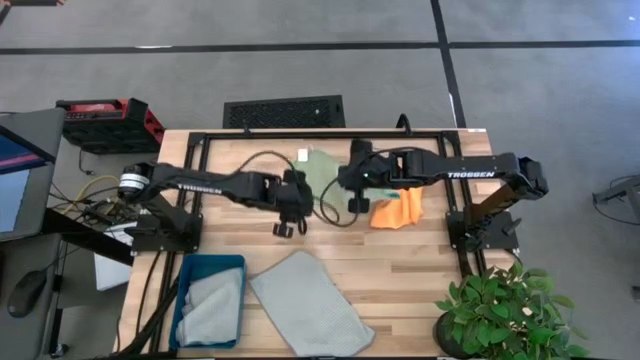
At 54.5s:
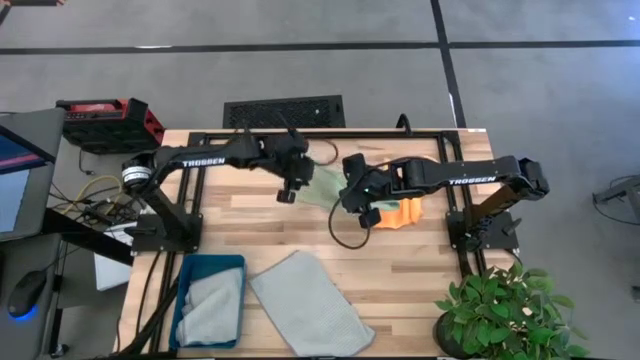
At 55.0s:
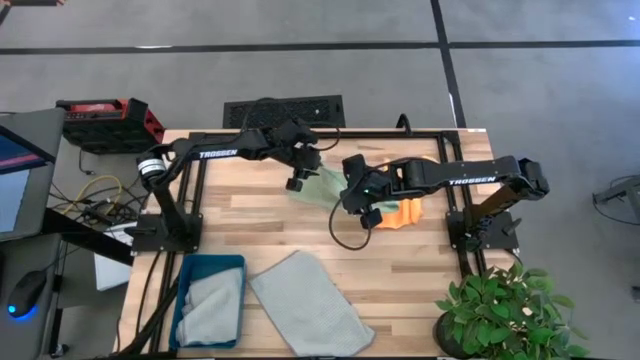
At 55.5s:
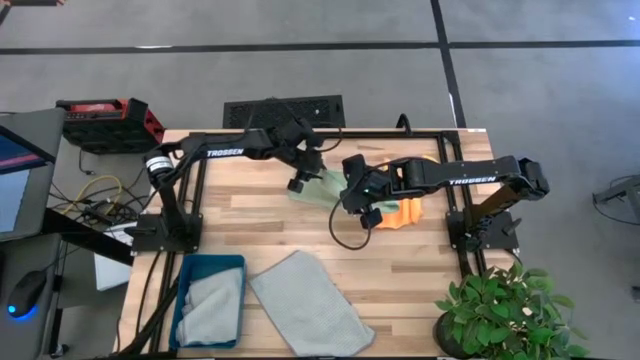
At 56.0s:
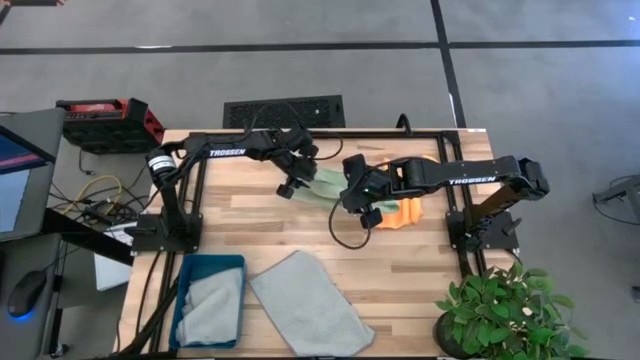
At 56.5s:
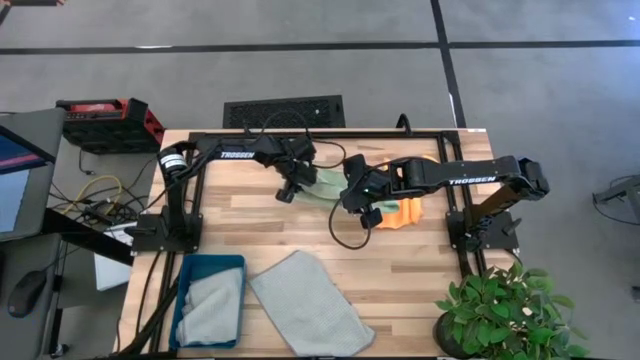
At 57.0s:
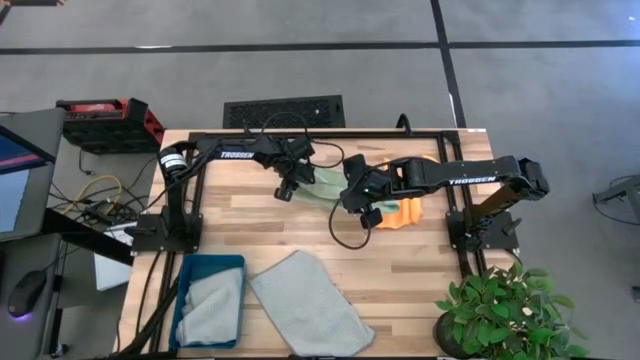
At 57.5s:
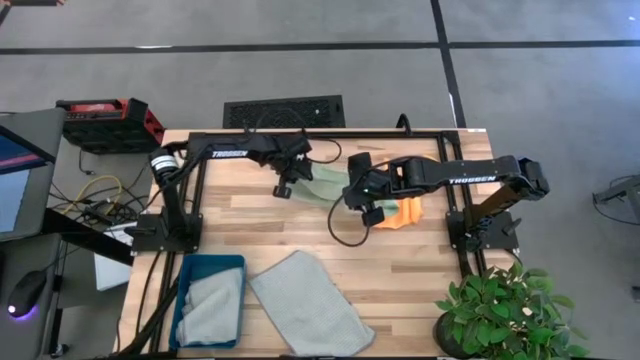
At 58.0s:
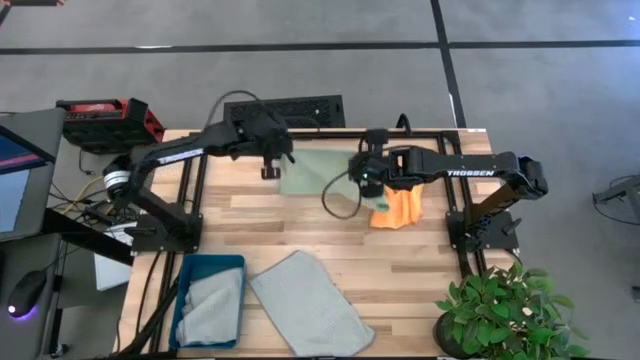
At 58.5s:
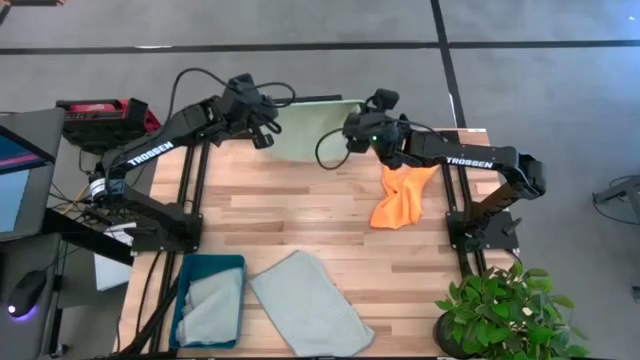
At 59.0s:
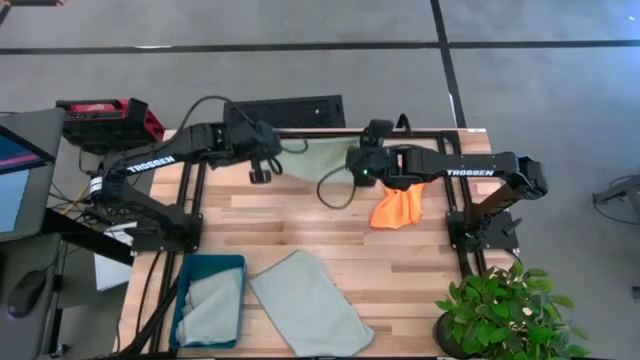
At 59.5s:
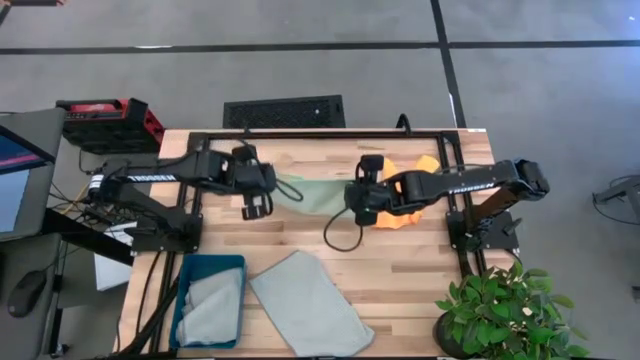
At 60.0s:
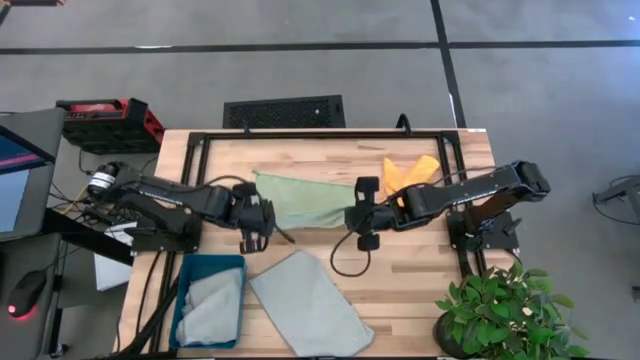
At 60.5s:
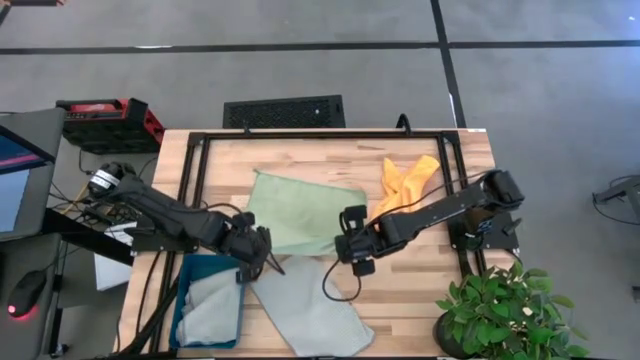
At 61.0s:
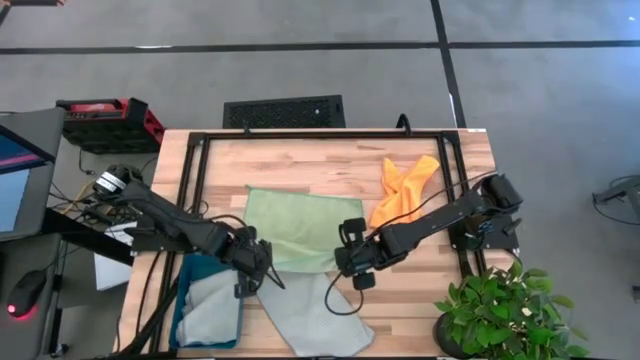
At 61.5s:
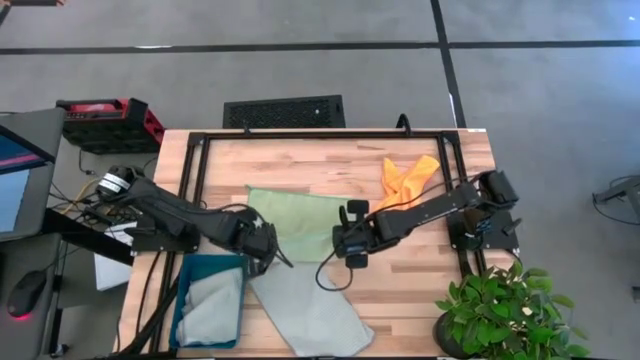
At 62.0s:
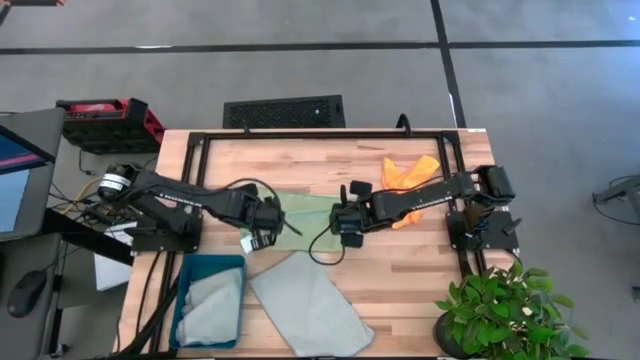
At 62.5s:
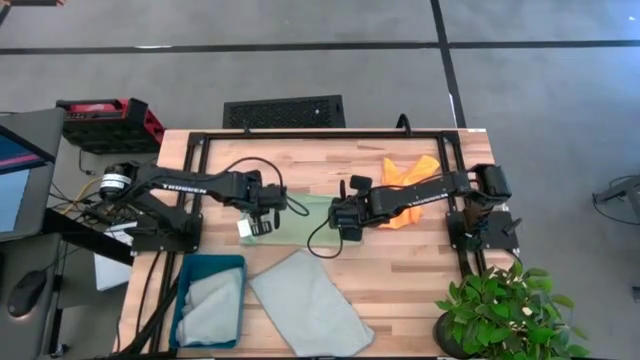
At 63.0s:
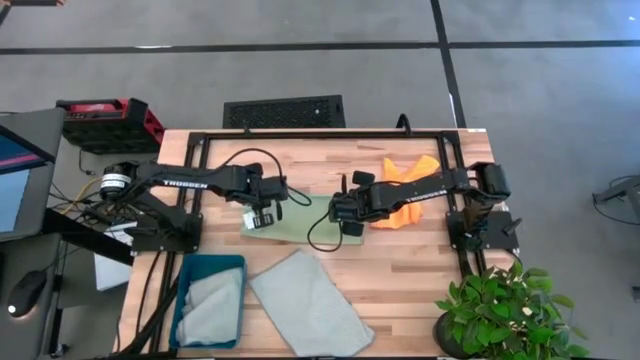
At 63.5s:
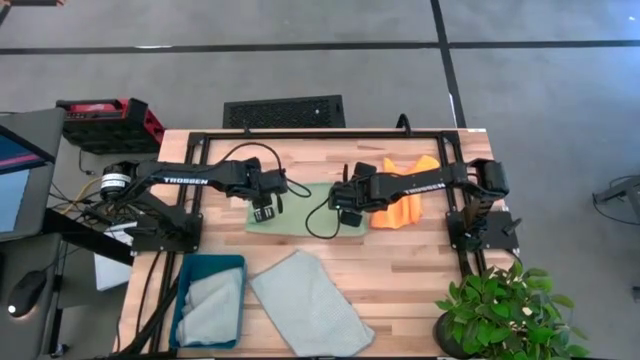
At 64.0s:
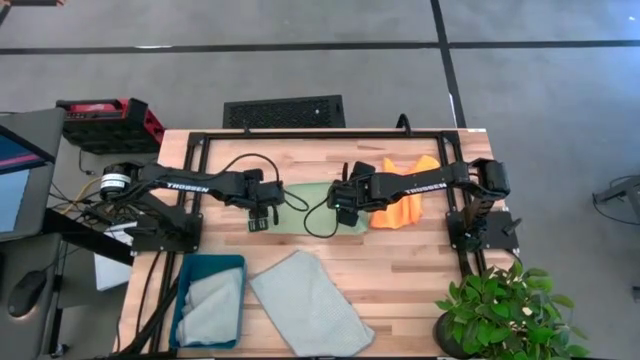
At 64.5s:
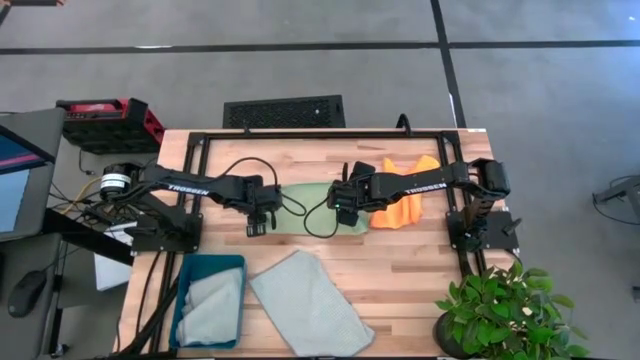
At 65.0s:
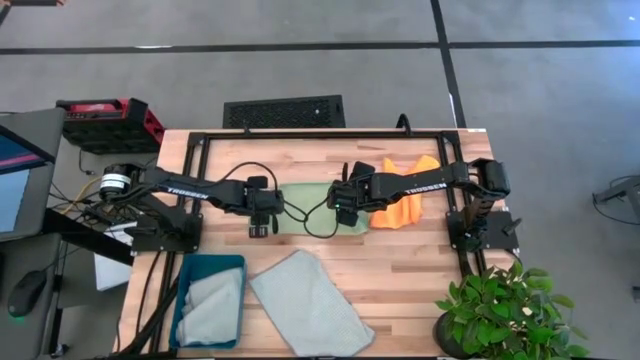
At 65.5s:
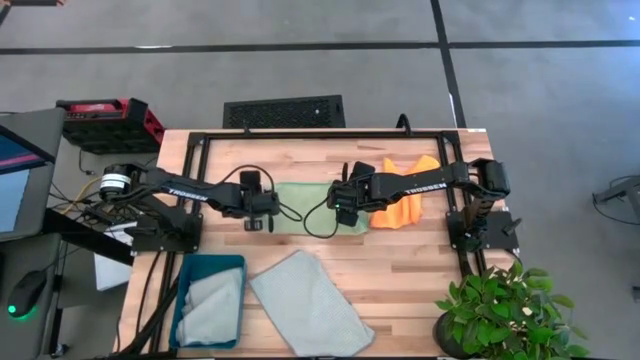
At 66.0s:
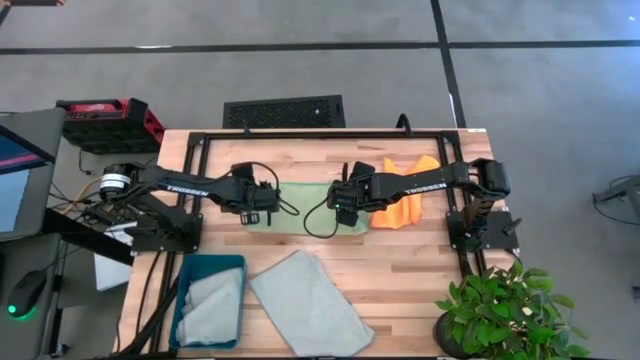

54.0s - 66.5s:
Task: Fold microfiber towels
Fold the green microfiber towel

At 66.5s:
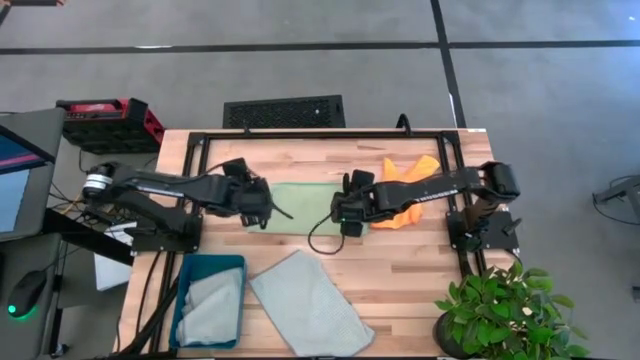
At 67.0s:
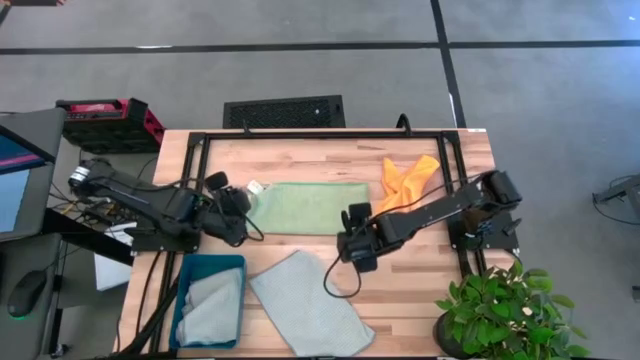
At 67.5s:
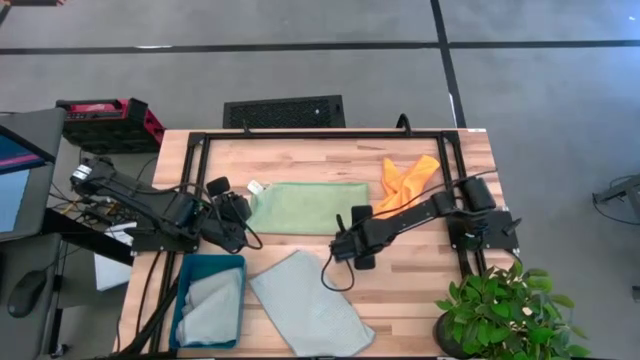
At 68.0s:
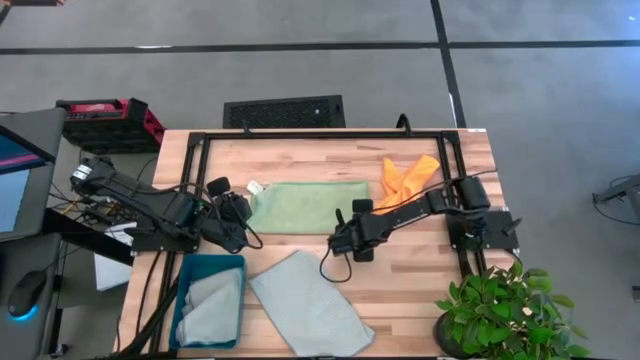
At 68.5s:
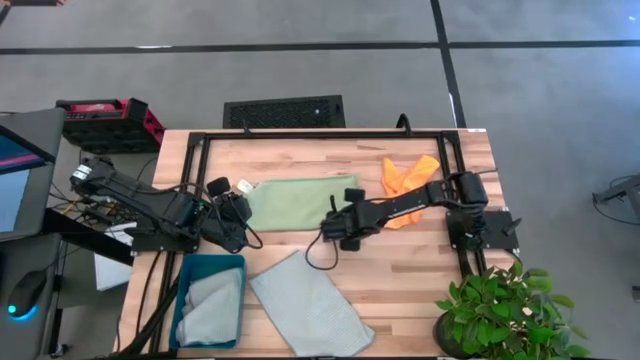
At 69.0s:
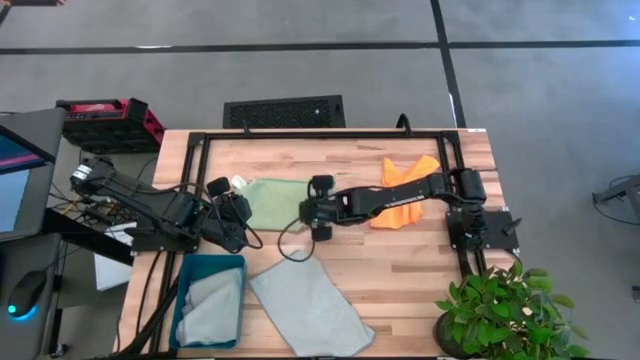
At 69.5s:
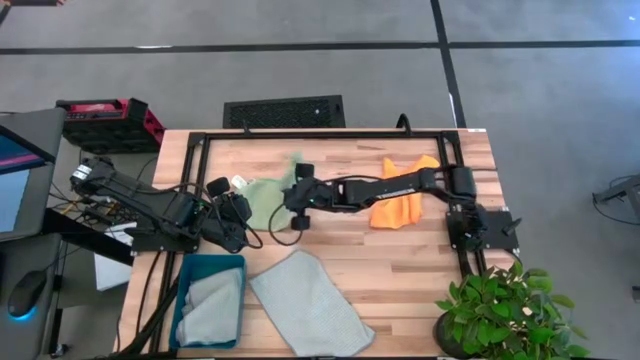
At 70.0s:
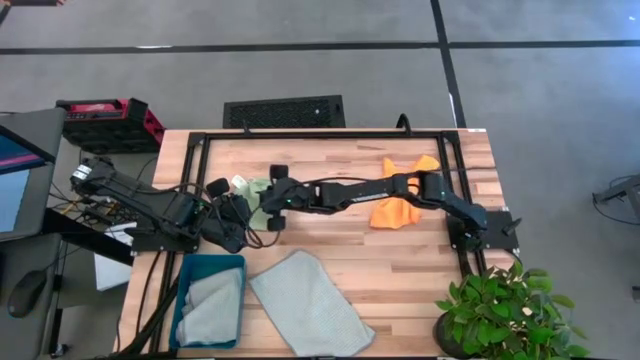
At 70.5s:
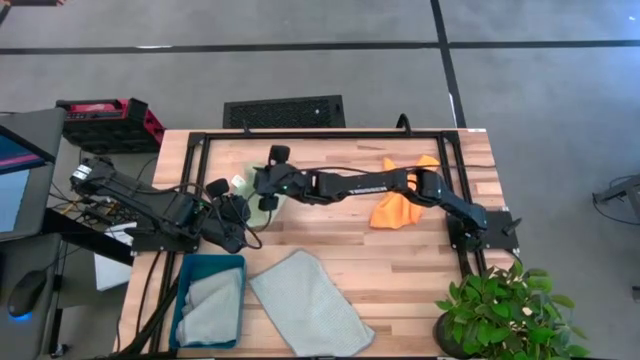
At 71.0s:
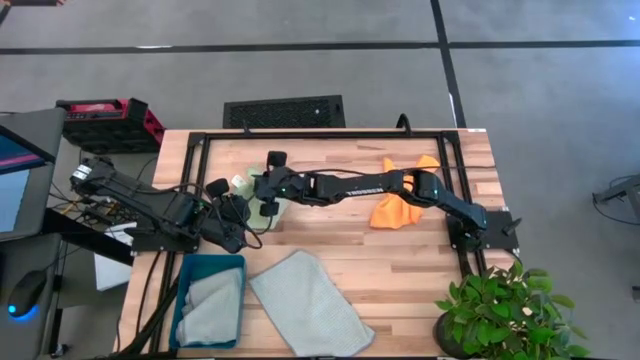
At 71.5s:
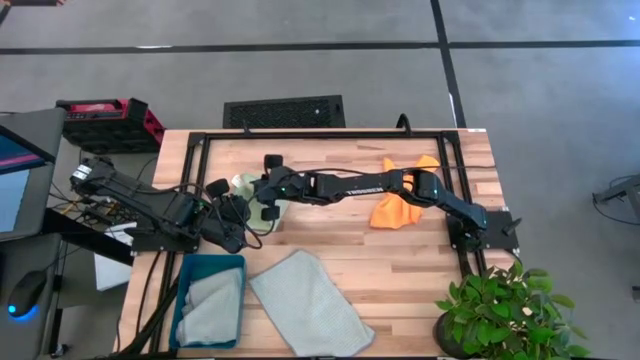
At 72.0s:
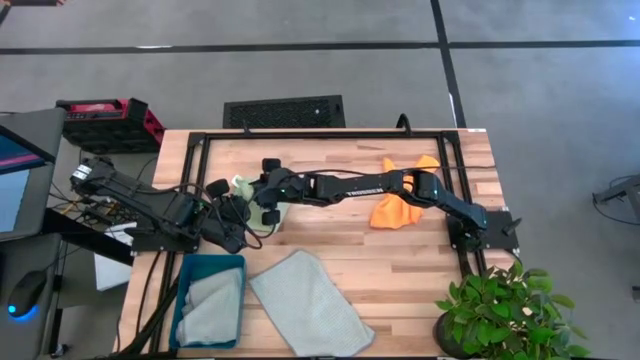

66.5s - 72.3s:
Fold the green microfiber towel

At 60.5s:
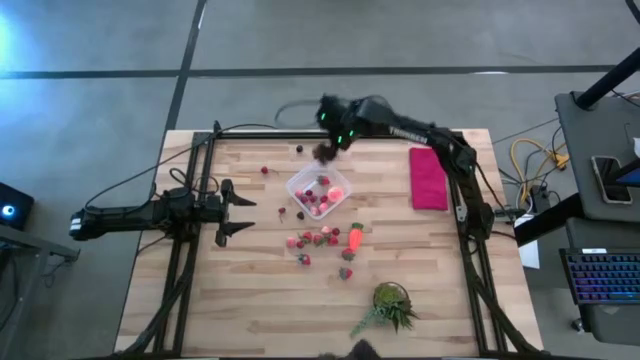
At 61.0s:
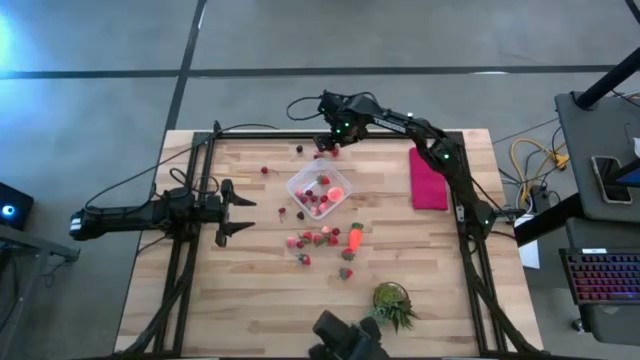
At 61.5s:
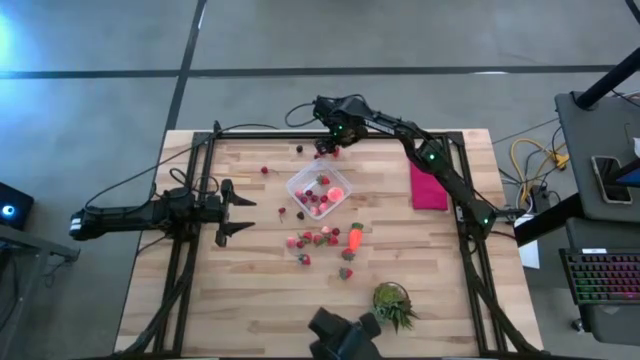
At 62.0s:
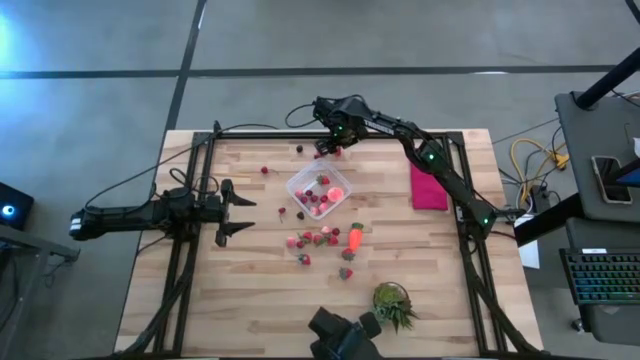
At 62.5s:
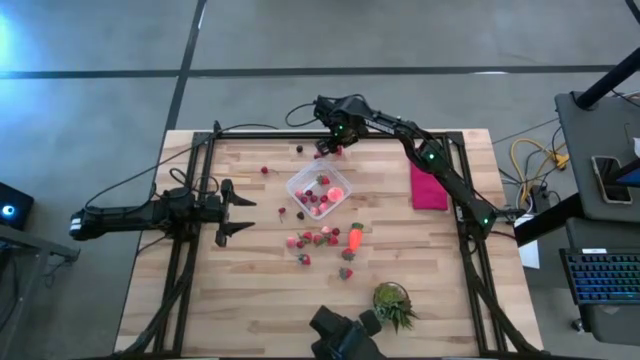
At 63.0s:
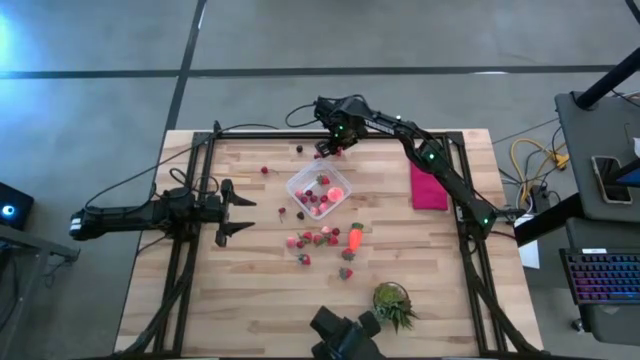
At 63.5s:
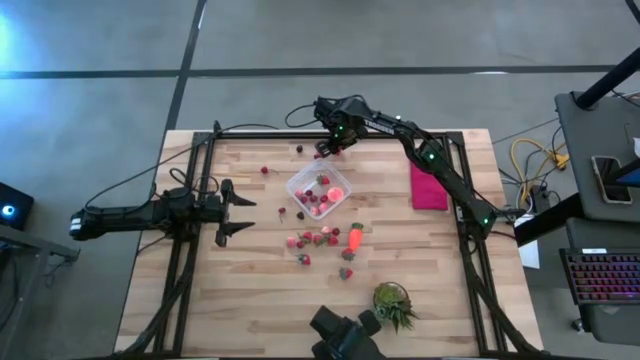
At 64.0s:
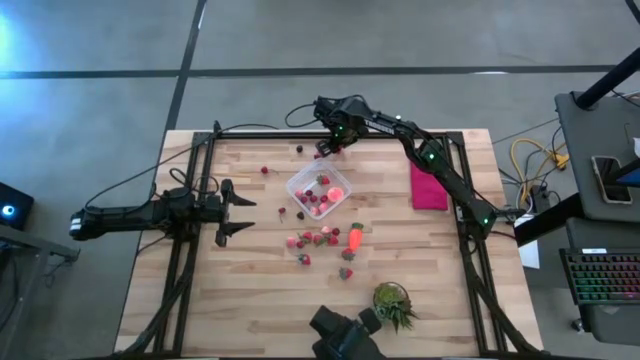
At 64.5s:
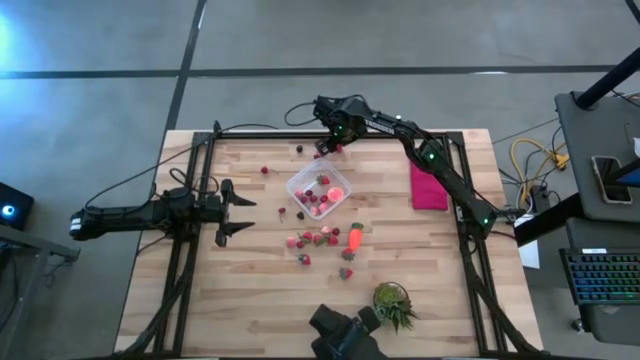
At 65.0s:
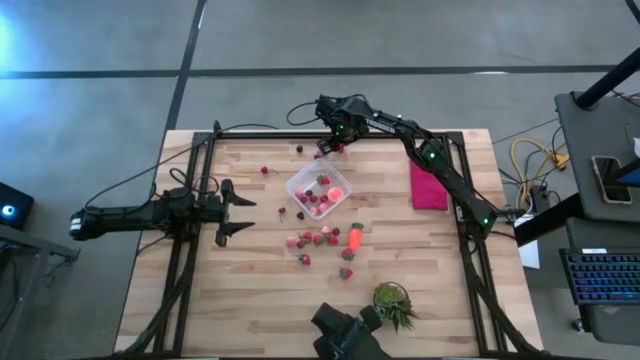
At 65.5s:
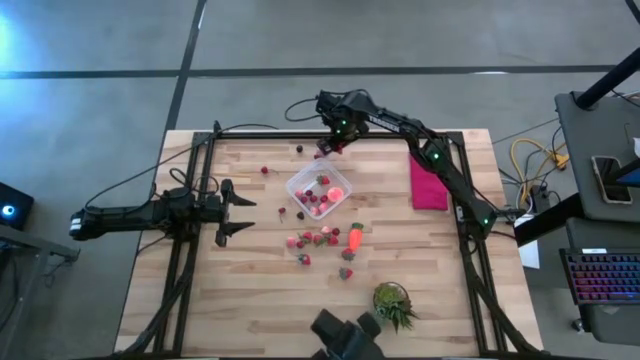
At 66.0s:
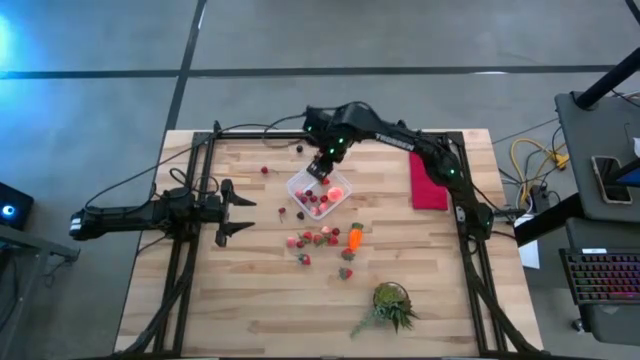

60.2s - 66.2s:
Task: Pick and placing Produce into tupperware
Put the red strawberry into the transparent container
